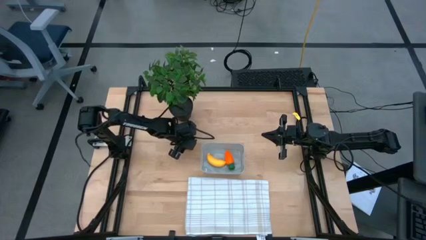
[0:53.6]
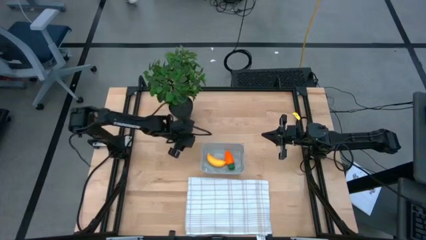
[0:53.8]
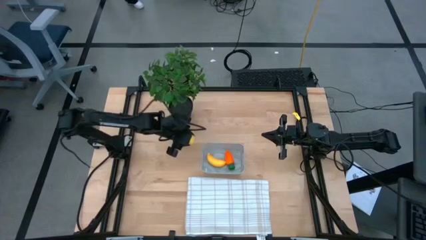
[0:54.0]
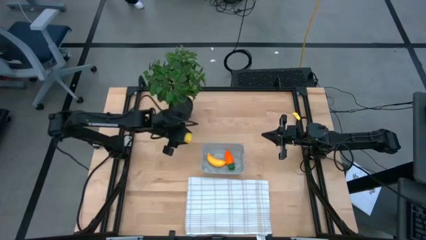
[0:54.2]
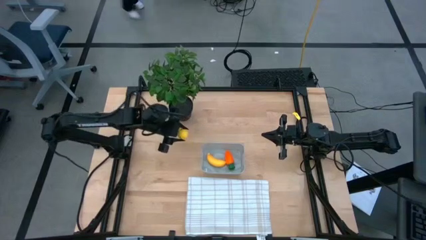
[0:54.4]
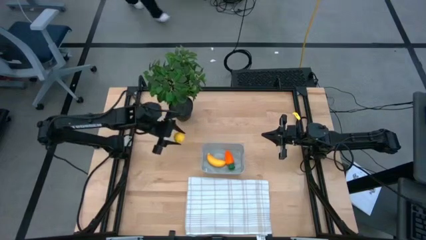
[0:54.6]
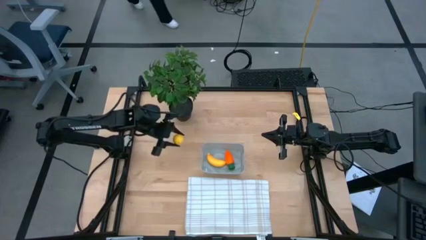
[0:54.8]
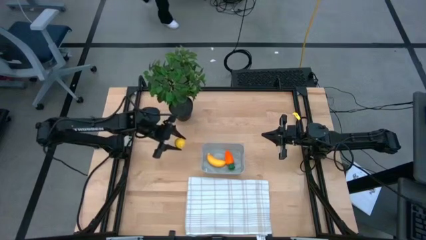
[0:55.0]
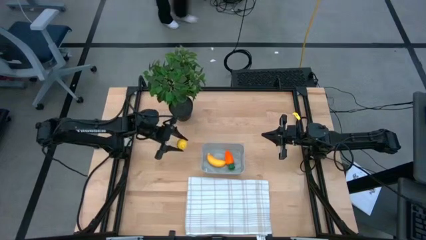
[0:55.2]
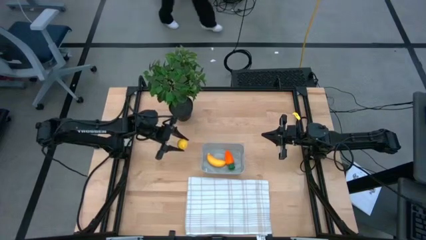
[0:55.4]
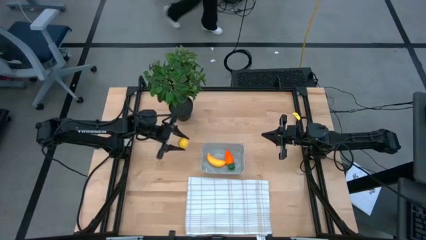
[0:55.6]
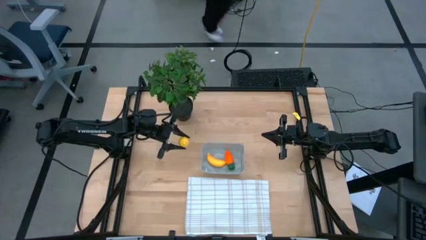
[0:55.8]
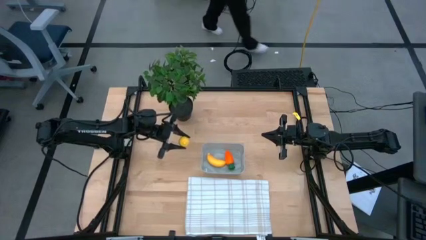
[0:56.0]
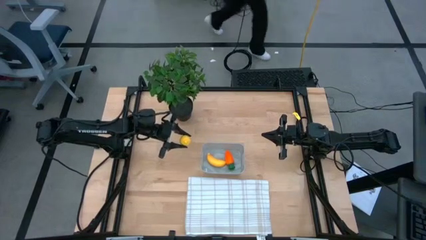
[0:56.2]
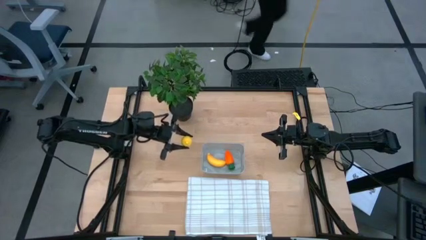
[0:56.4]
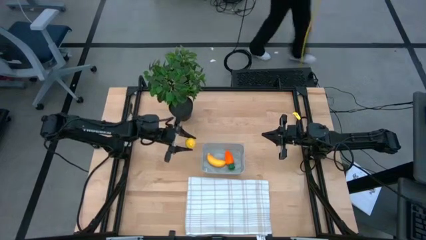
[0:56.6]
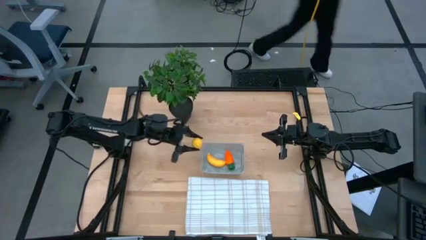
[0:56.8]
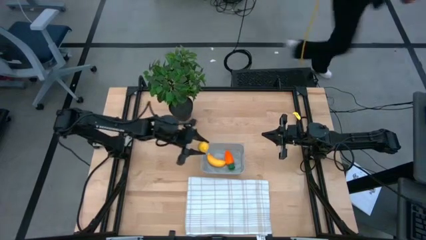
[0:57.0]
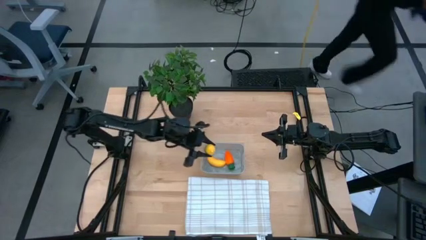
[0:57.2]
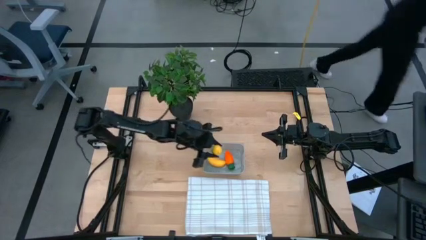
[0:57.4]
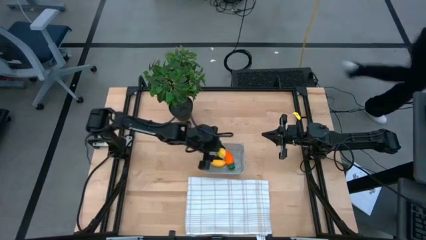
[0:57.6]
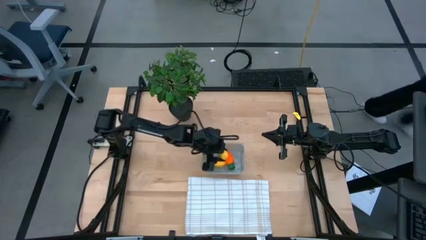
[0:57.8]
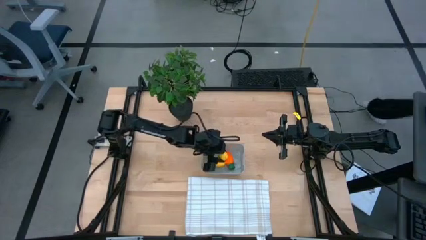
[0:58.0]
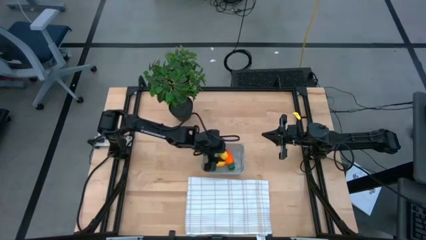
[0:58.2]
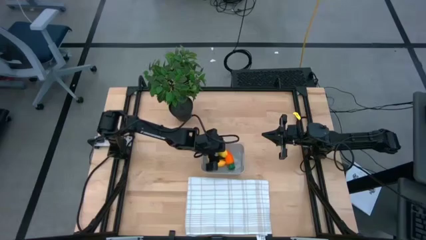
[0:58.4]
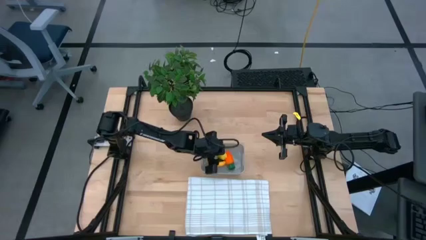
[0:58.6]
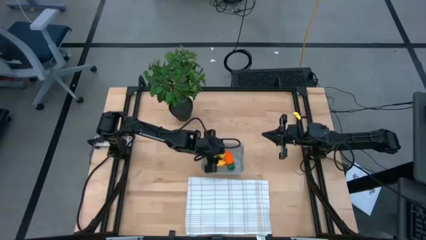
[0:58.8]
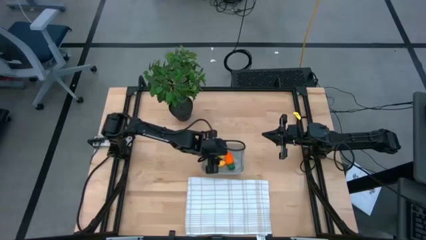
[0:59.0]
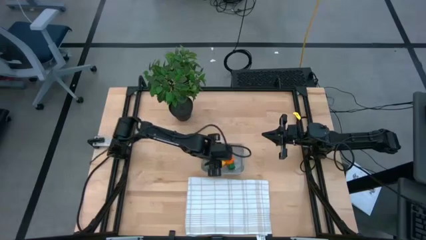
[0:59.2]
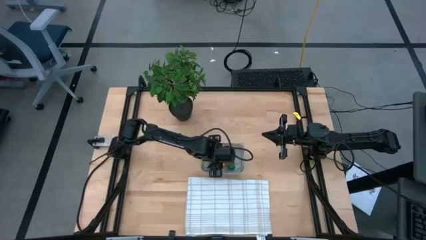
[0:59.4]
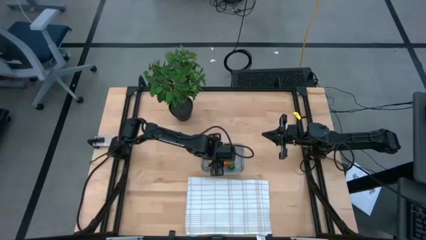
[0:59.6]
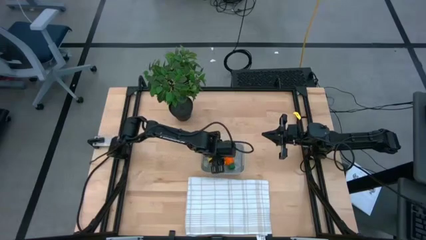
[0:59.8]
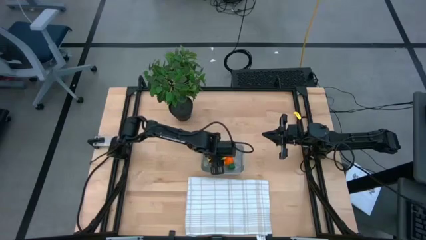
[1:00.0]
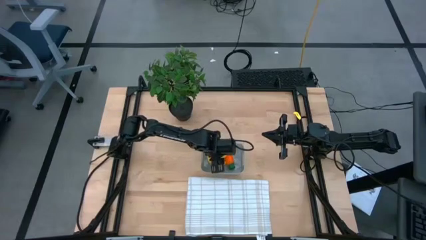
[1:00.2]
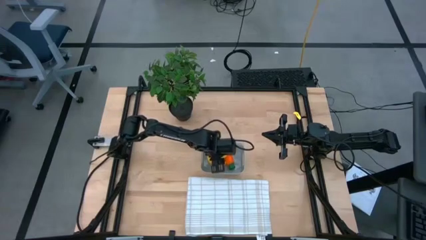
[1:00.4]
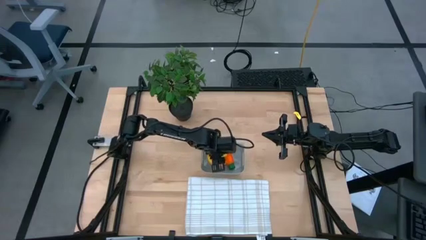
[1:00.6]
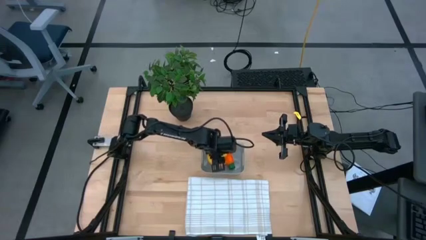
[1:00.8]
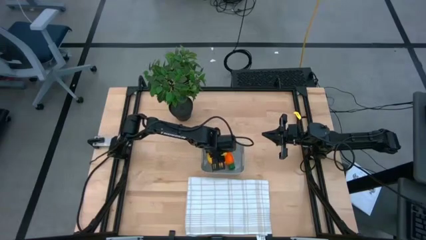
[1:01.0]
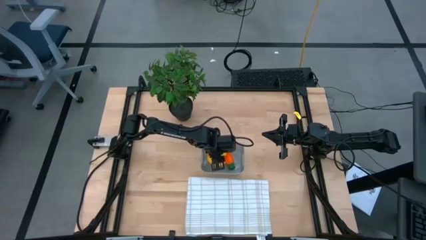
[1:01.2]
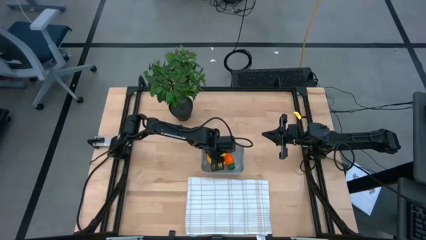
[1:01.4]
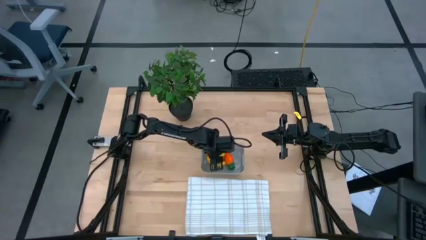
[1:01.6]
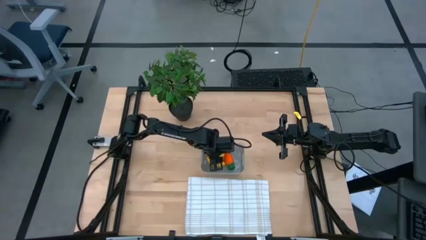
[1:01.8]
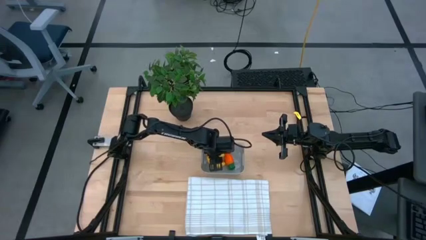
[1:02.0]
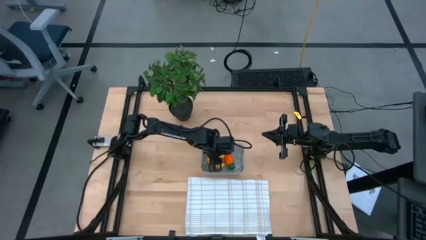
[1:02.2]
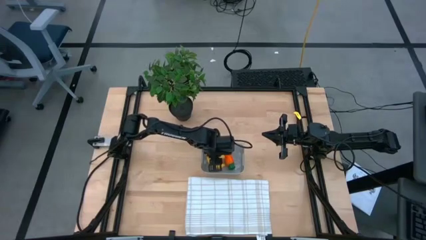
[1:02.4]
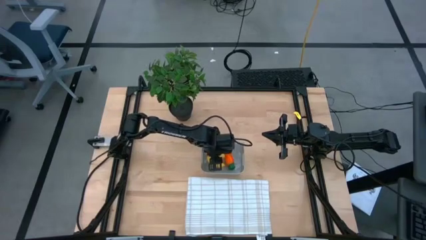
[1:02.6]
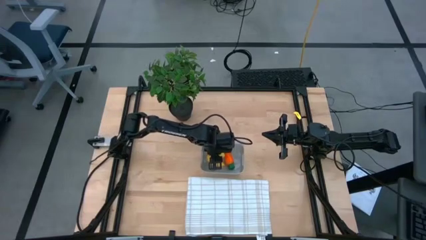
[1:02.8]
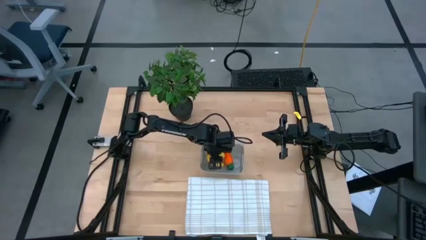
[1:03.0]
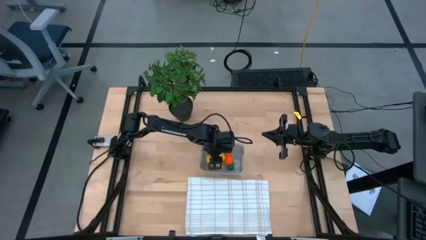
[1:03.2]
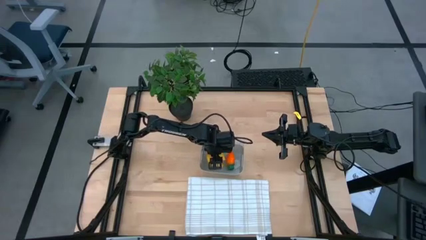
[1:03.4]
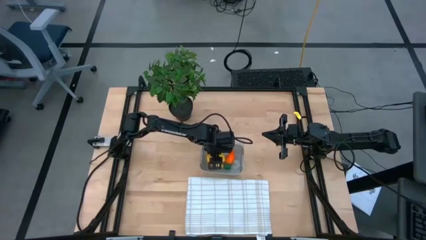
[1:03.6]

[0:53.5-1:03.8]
Task: Pick and placing Produce into tupperware
Put the yellow lemon into the gray basket

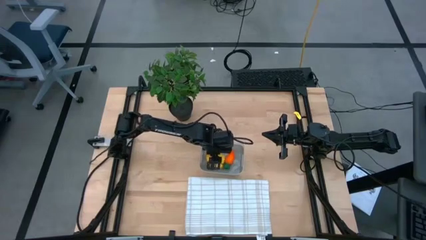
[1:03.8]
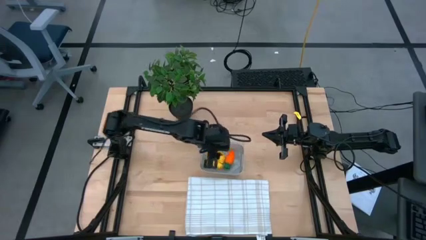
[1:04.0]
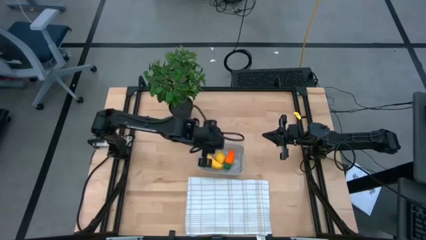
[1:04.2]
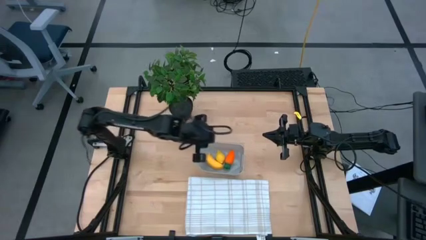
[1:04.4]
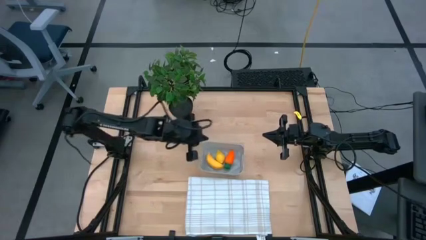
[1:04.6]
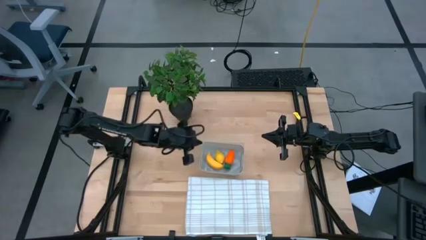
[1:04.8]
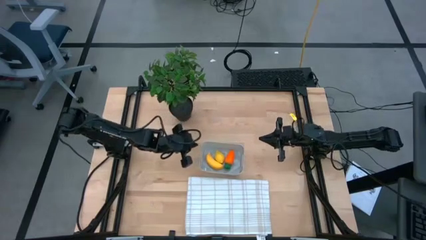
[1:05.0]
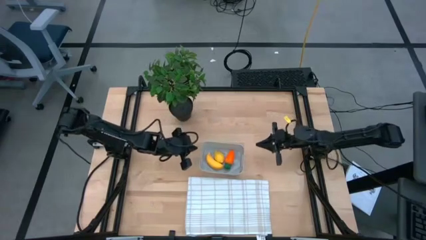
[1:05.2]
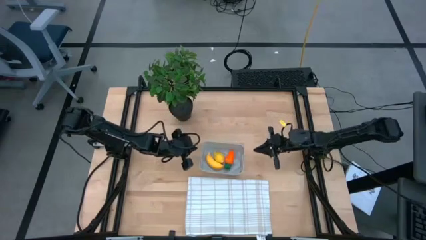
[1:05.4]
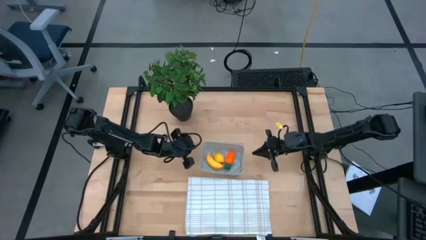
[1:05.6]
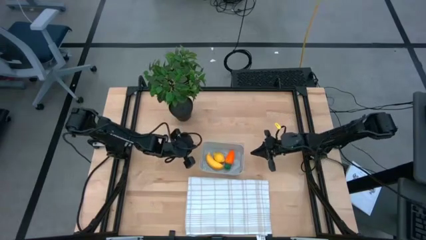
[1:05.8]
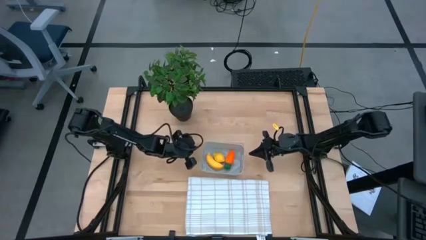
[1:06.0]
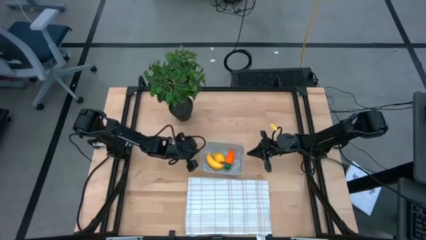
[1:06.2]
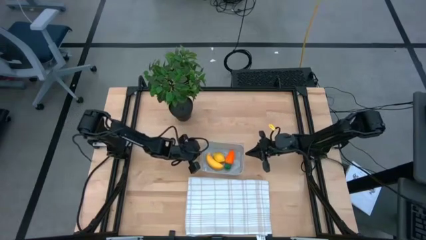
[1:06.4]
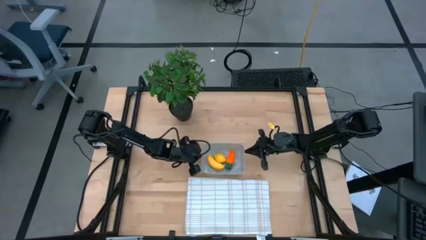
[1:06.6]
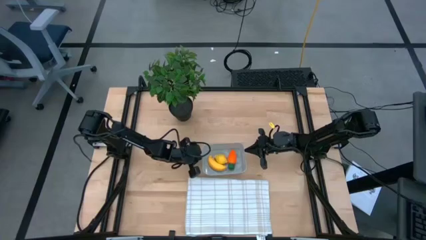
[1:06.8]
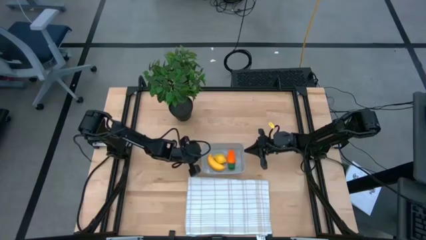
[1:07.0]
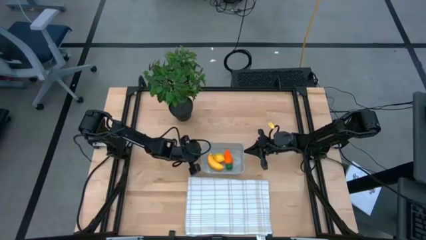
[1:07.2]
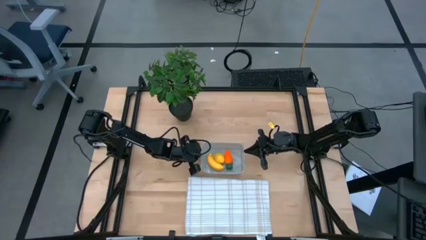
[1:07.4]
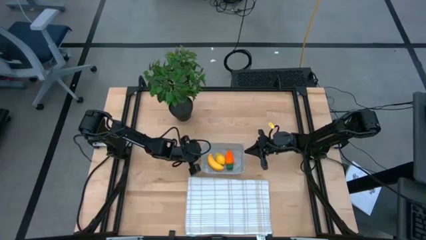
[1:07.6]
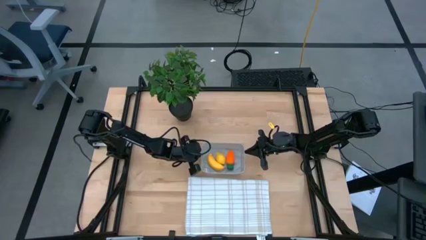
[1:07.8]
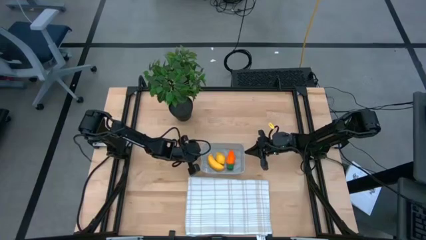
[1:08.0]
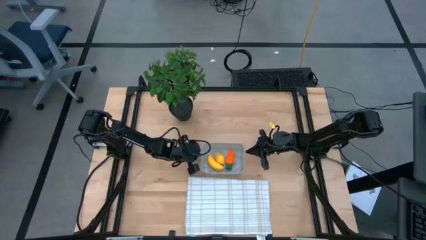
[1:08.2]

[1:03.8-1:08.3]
Adjust the gray basket

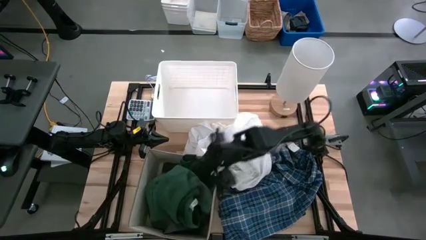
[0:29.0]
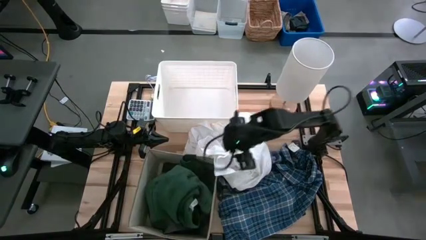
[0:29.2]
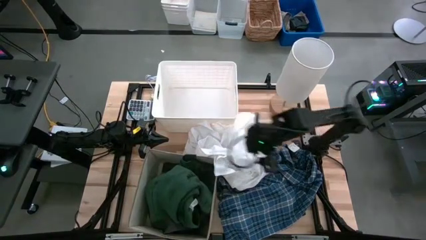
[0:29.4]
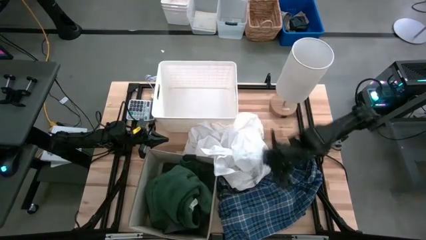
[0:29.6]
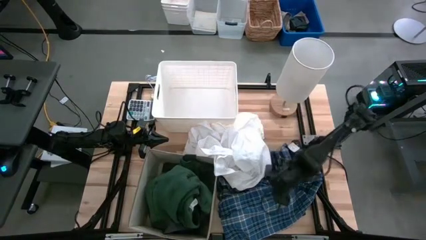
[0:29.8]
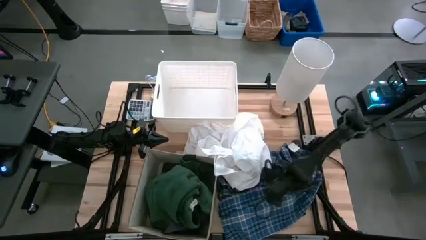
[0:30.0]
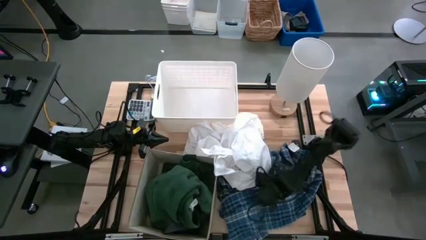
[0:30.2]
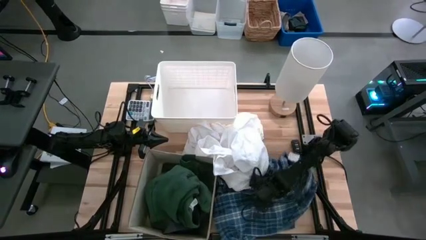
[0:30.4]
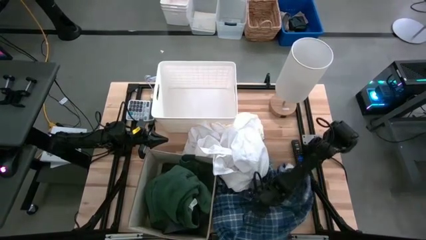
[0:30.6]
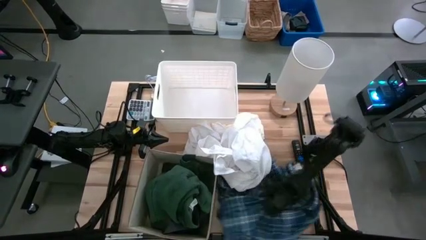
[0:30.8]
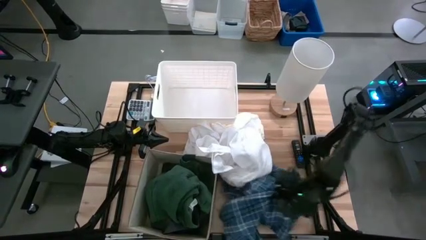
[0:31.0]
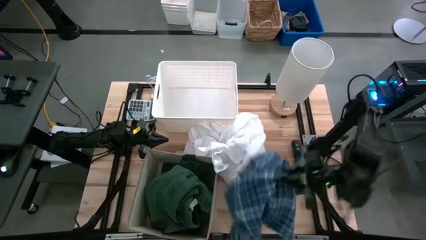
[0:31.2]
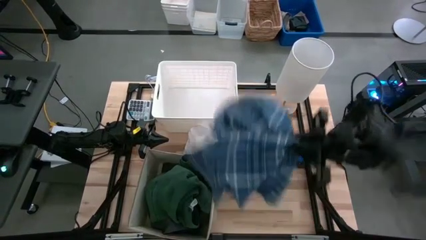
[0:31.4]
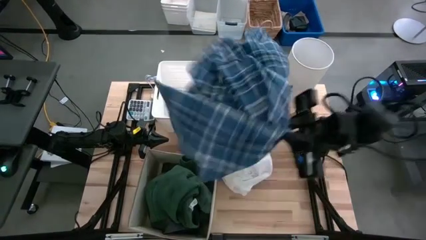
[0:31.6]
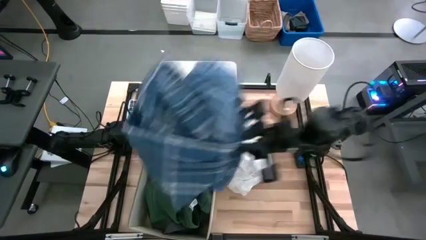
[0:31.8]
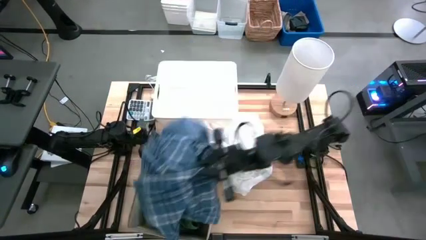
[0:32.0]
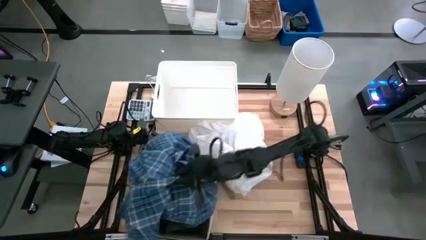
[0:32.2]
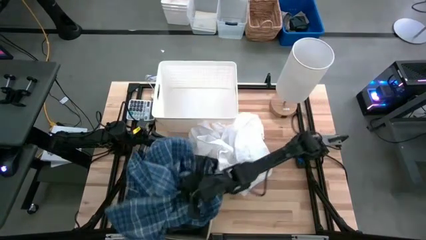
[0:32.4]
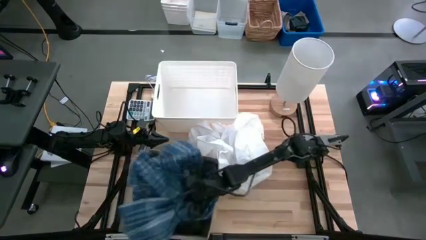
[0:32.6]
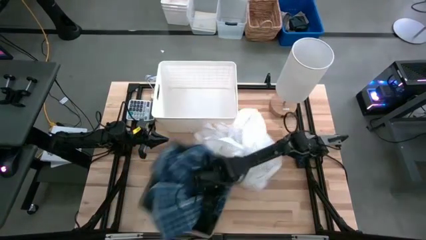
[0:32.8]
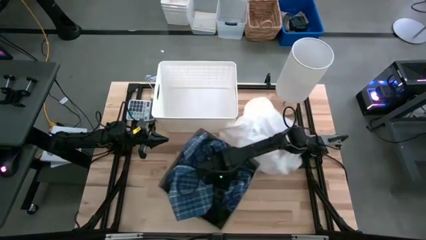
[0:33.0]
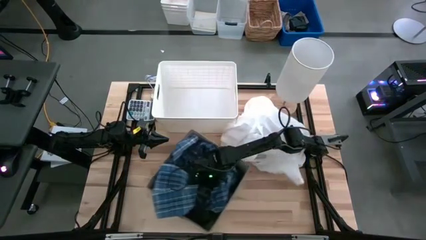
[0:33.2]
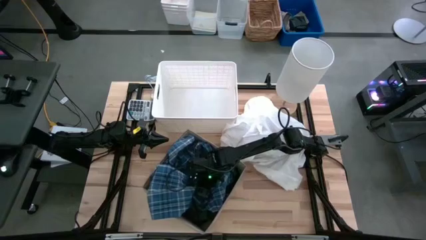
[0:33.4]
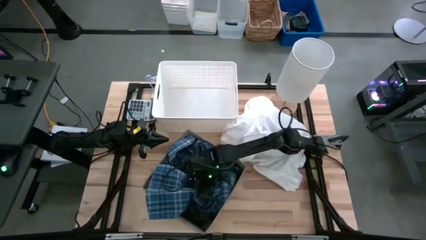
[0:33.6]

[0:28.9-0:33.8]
Task: Sort clothes
Put the blue shirt into the laundry organizer
